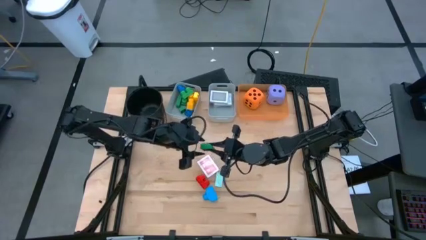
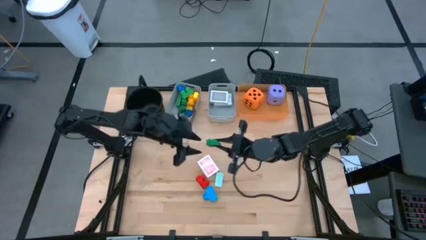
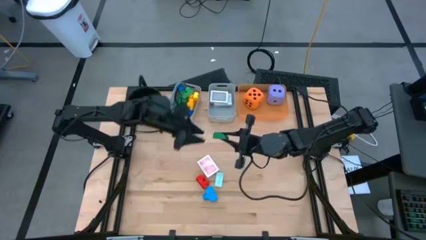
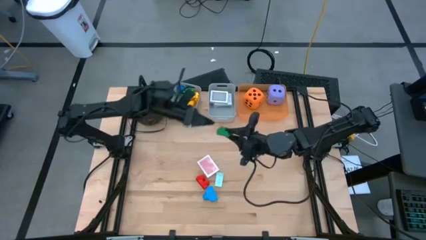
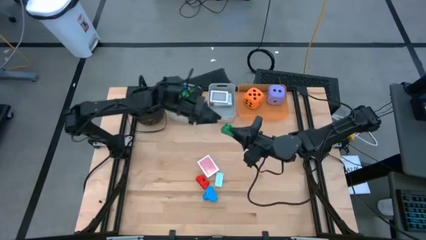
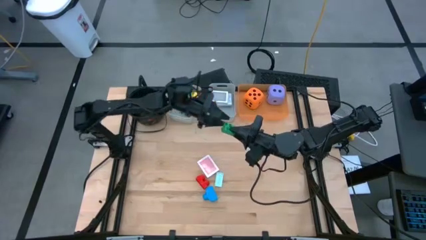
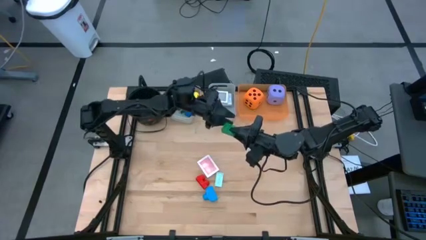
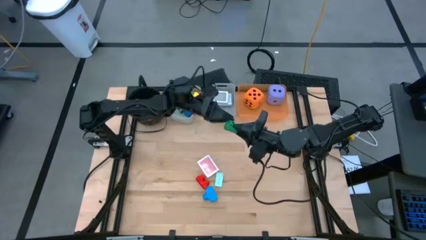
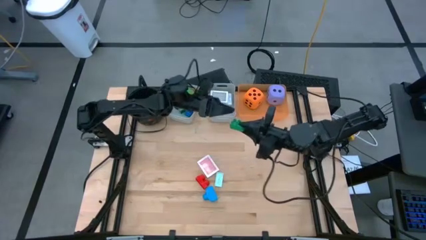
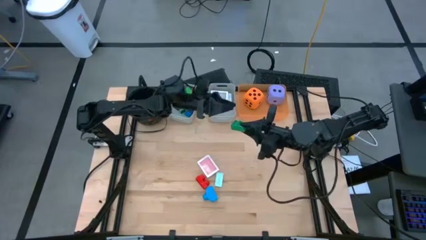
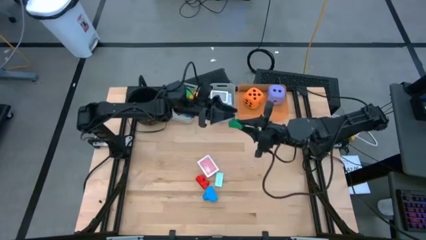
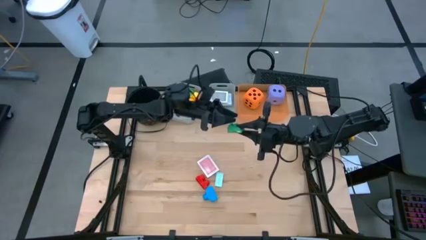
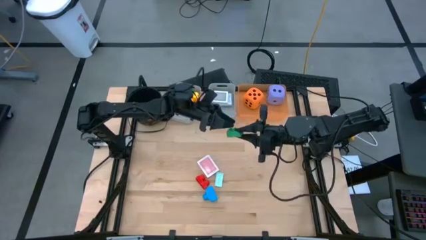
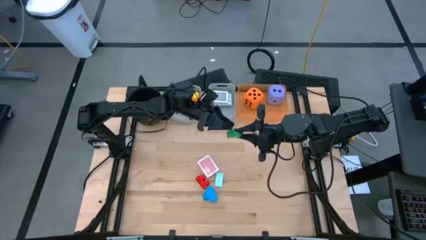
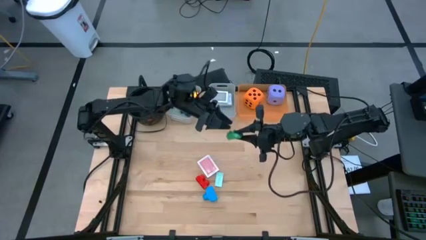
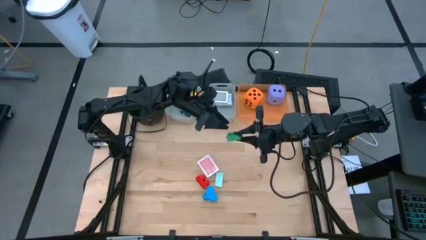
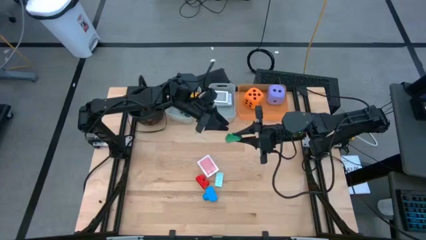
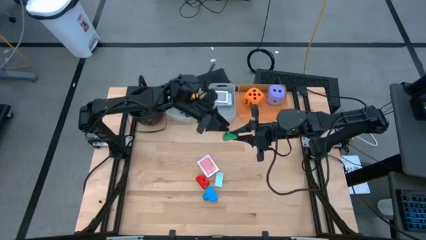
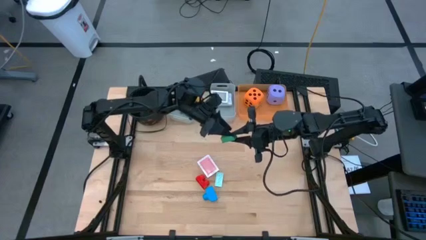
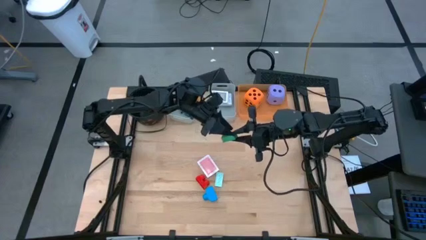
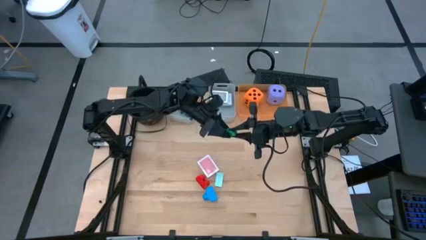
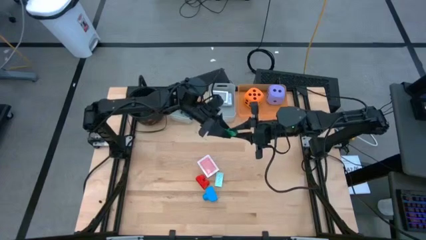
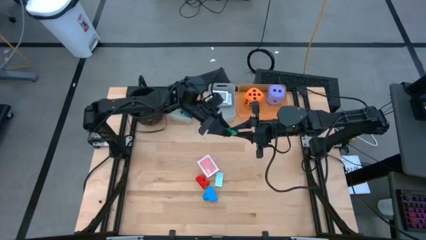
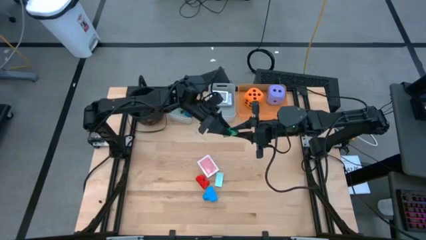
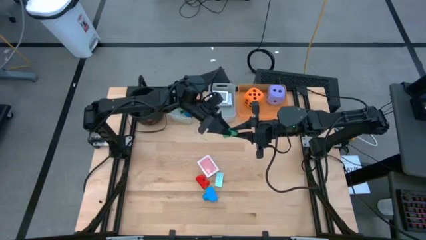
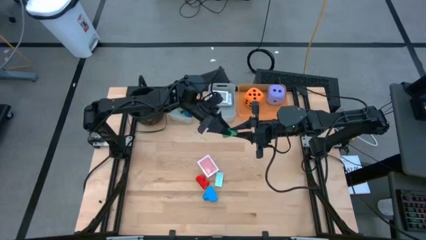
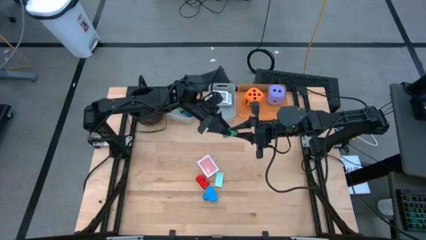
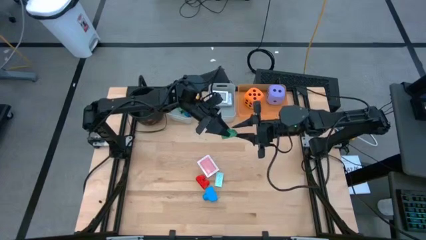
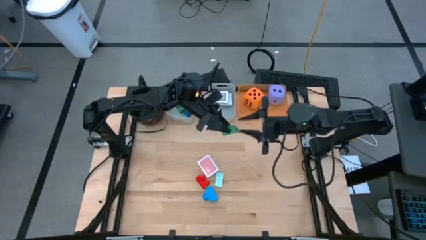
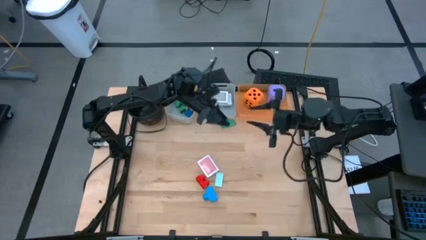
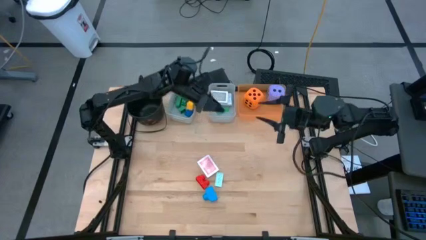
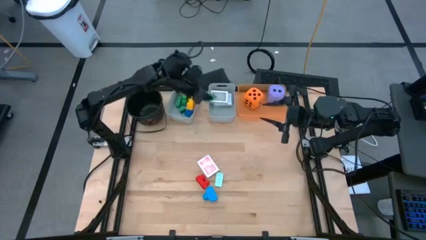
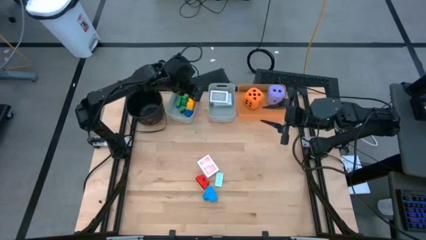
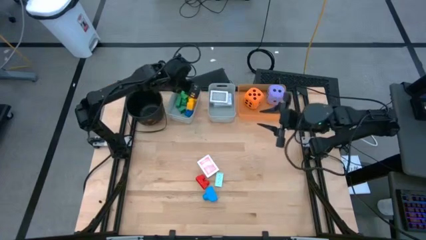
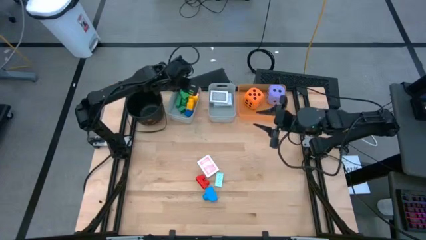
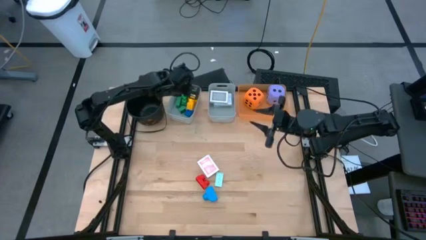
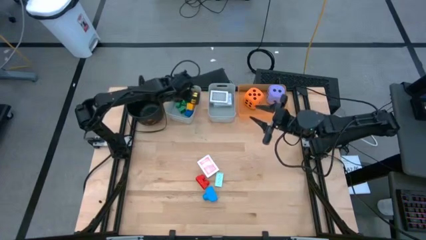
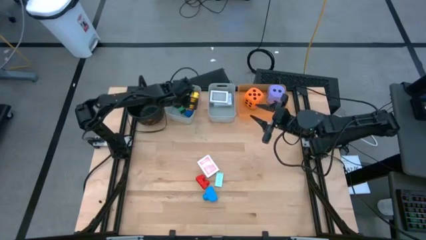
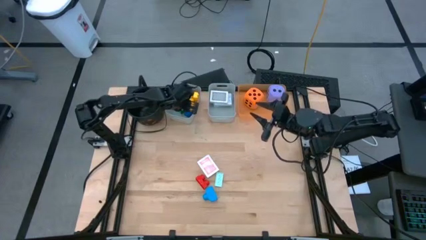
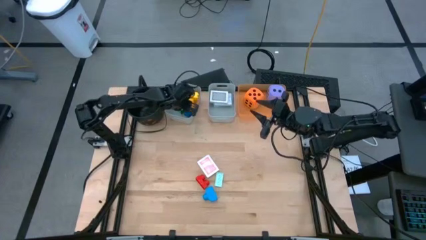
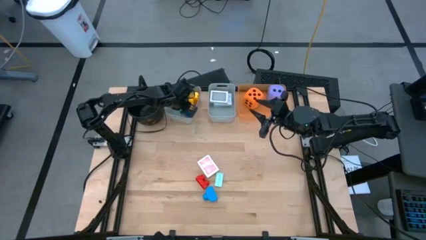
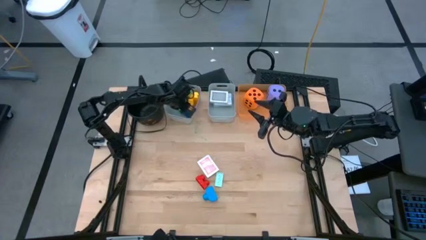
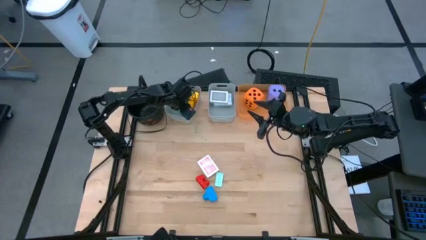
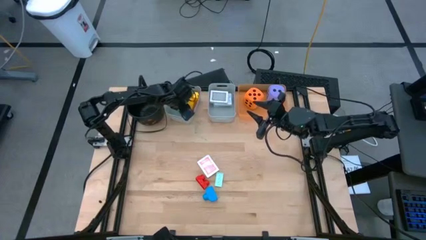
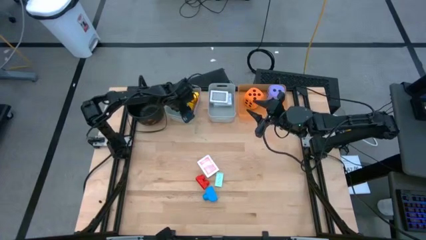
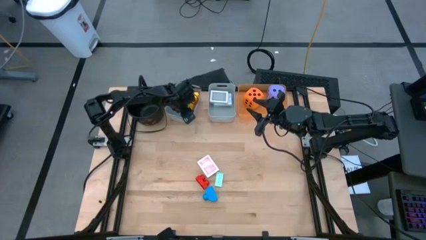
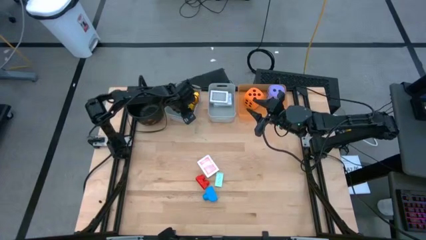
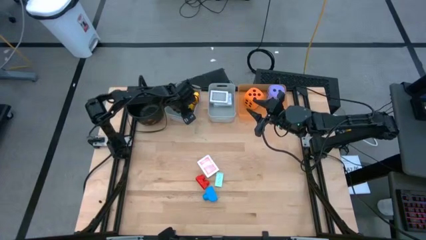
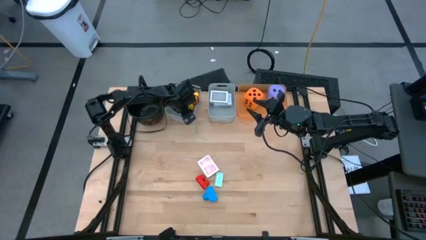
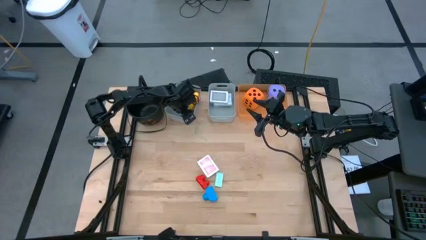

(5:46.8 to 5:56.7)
Task: Pick & Place Toys
Put the green game piece into the left gray bin

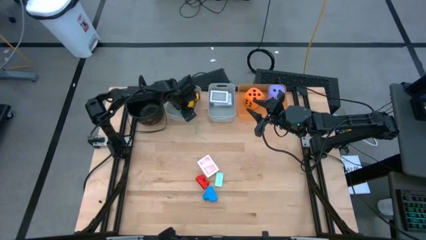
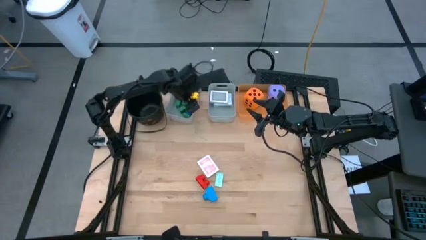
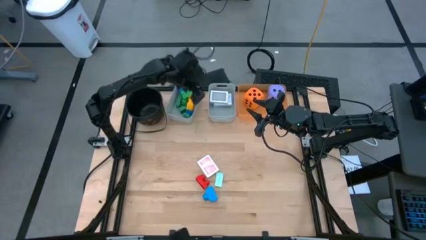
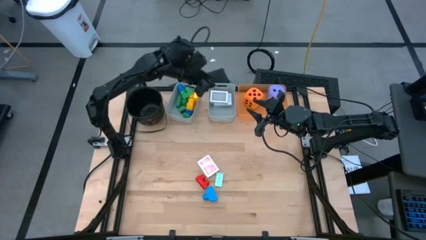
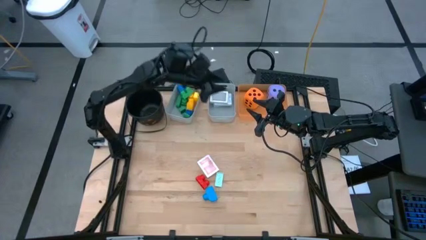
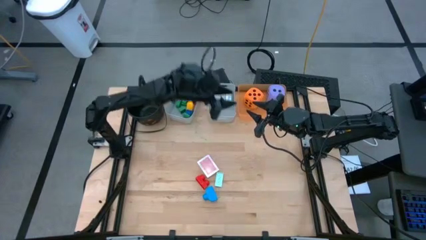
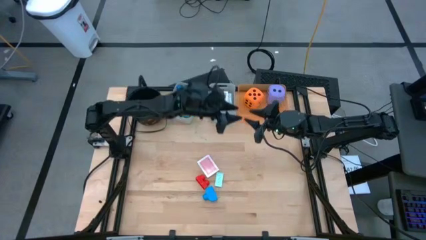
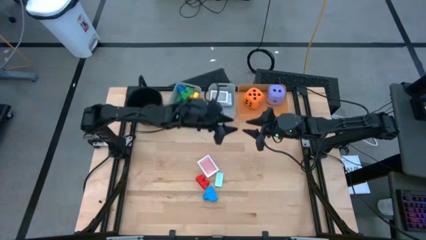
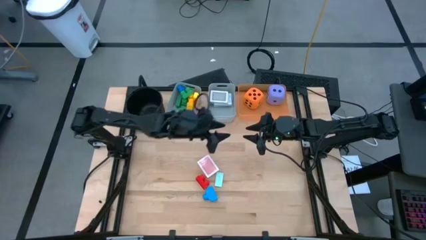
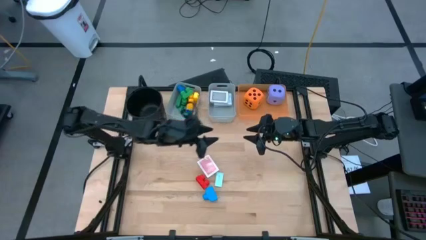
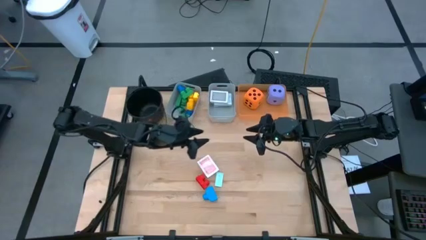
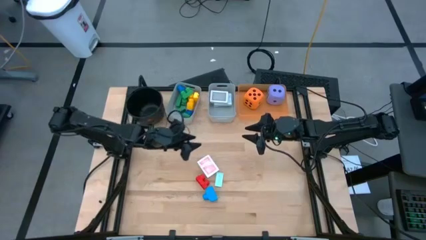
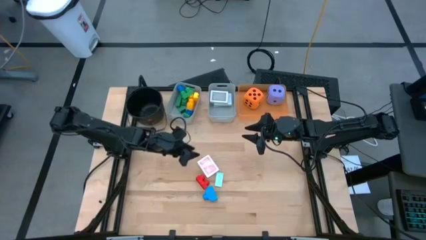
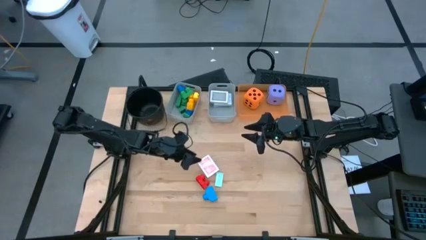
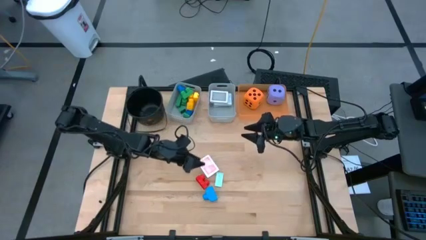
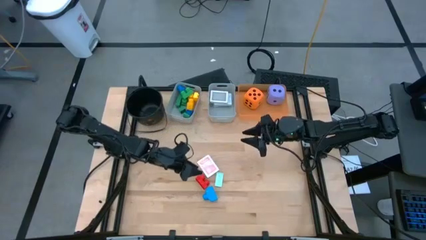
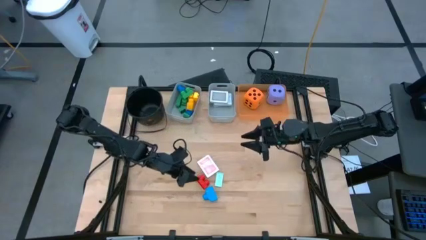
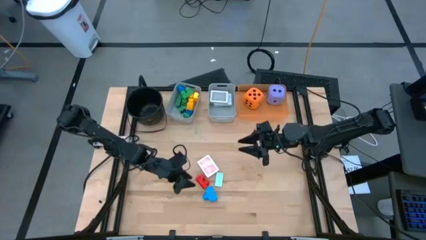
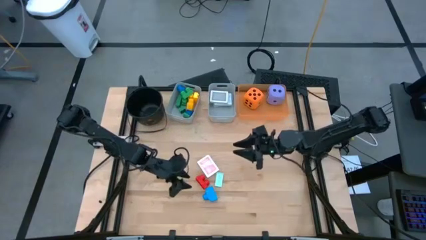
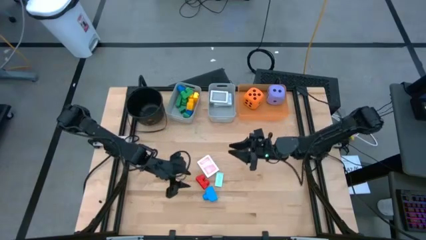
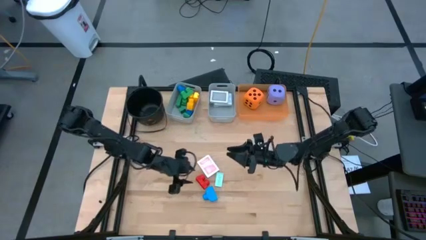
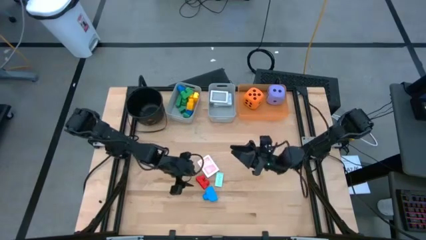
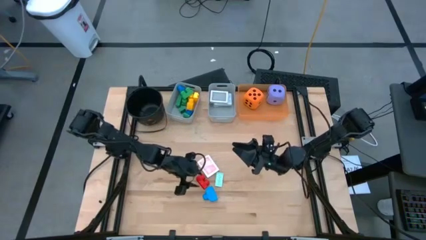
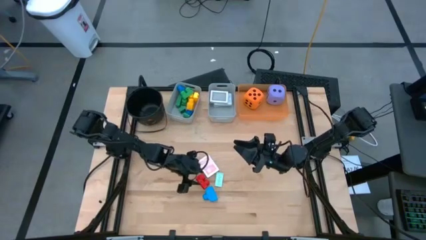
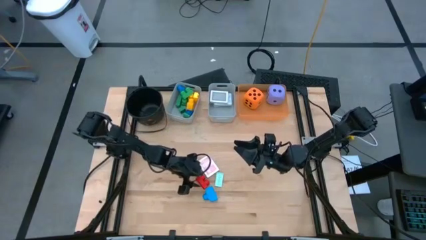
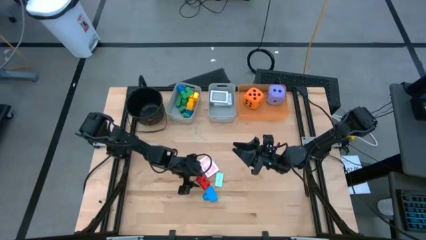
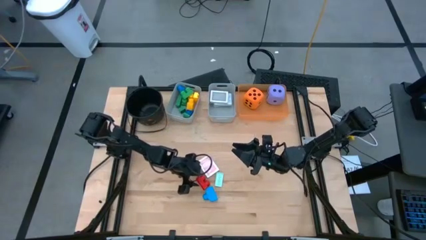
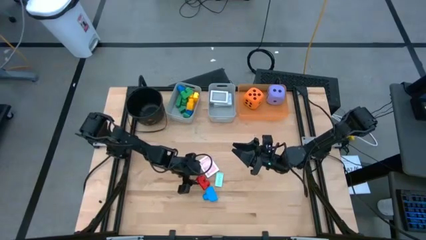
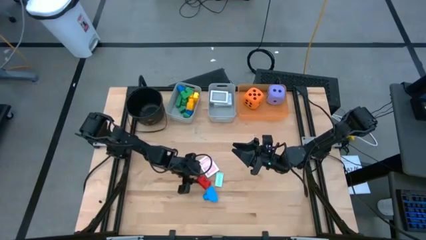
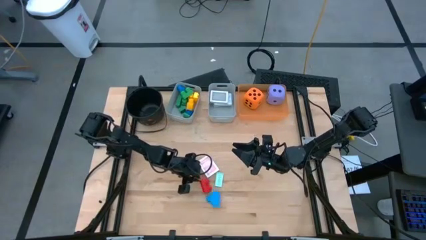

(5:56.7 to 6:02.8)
Put the red game piece into the left gray bin
